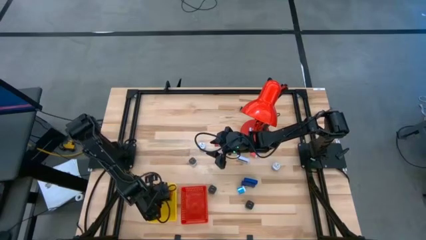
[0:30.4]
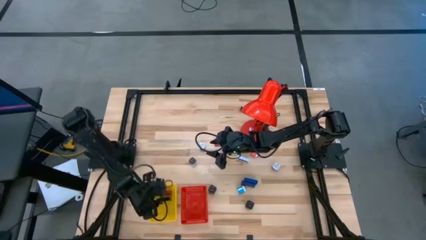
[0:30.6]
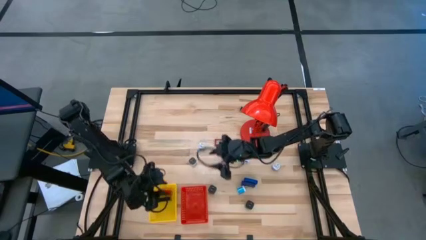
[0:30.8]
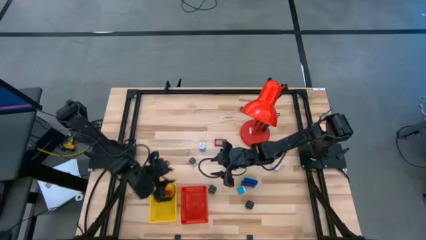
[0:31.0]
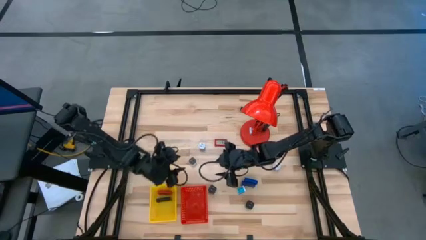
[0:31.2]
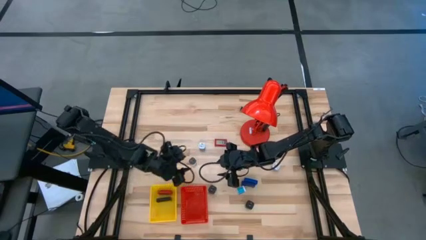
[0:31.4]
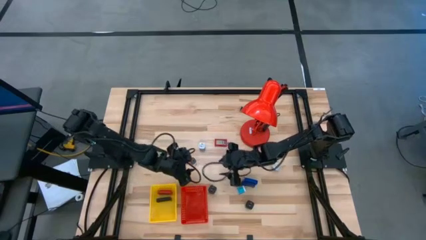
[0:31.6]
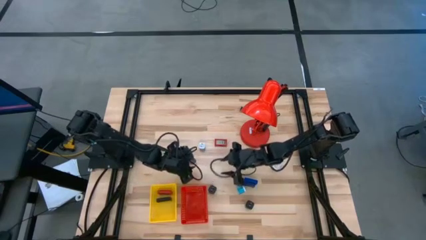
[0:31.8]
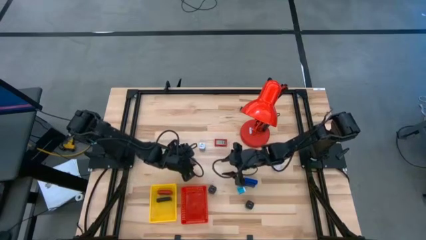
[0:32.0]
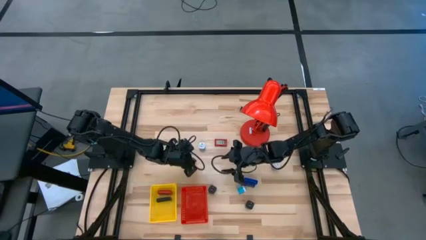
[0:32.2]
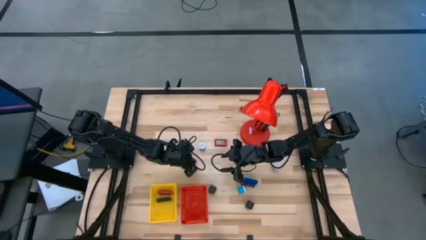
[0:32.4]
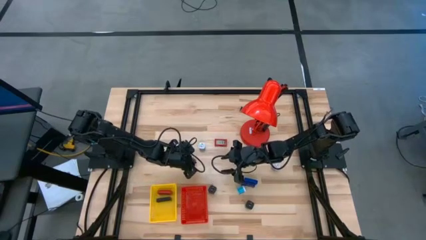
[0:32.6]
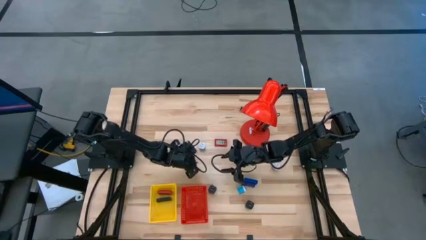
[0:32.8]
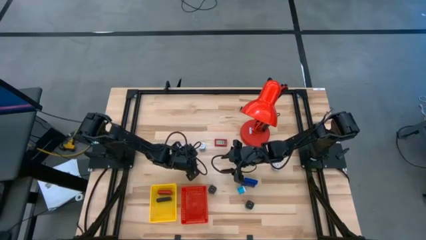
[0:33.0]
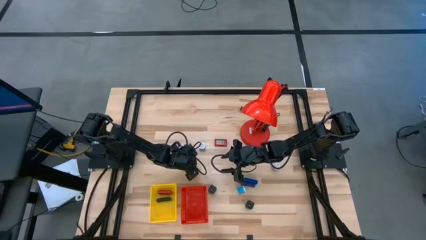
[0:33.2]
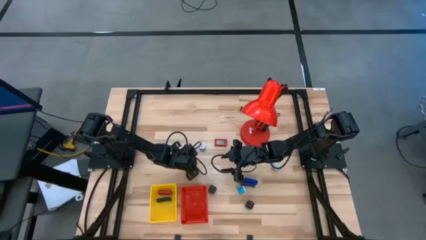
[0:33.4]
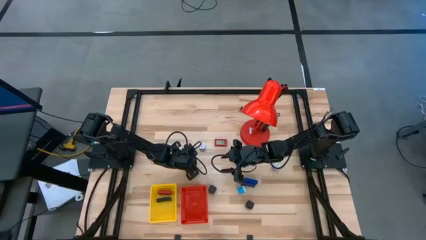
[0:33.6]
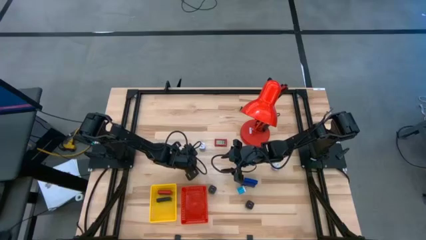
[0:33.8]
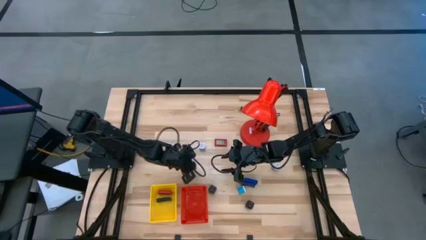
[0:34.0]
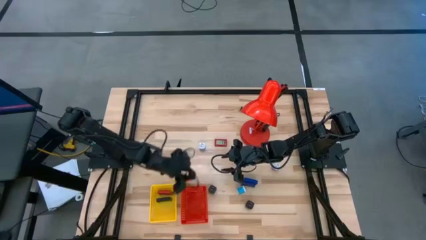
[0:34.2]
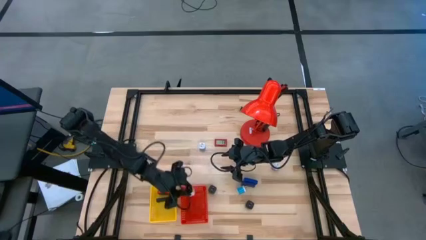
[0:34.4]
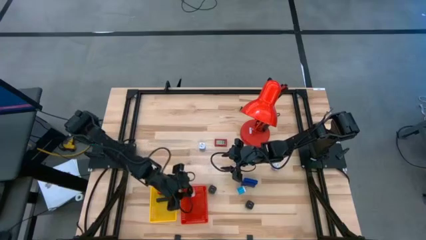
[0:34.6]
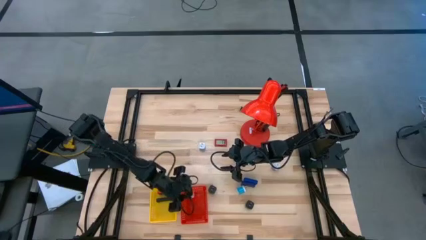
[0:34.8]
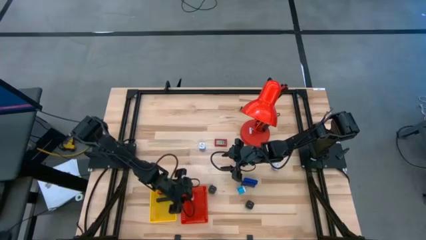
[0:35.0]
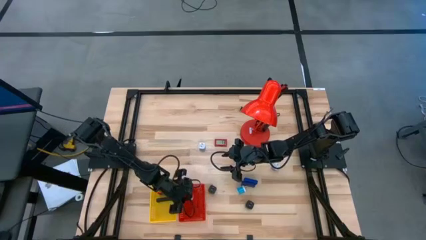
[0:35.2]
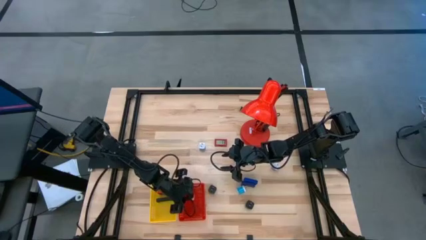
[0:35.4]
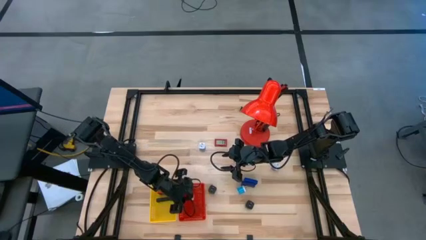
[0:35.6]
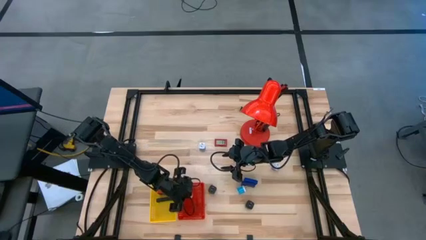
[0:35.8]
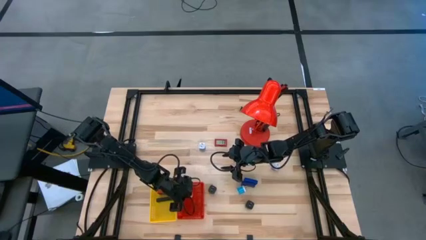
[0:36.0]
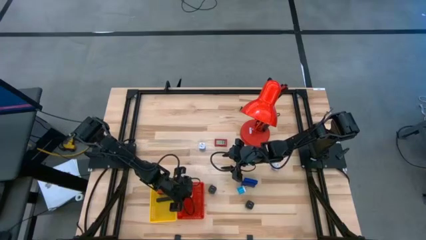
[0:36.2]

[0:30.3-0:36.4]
Task: Pick & Place Office items
Put the black charger adapter into the red bin

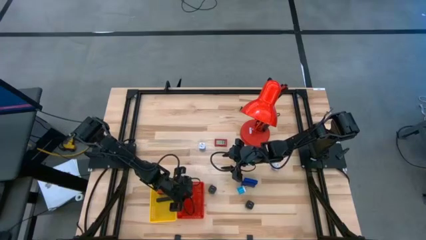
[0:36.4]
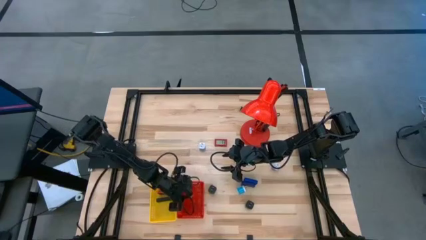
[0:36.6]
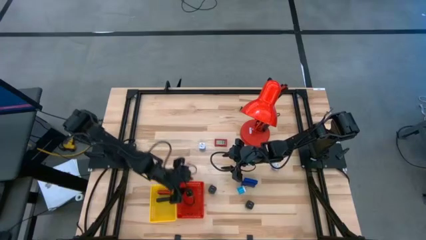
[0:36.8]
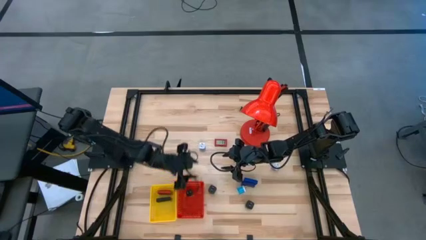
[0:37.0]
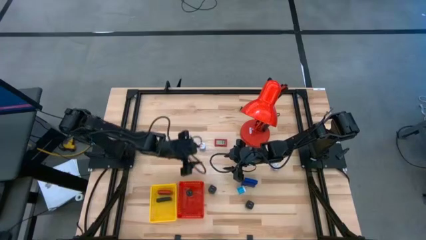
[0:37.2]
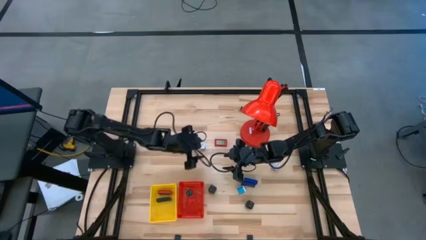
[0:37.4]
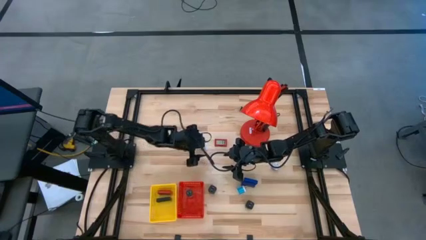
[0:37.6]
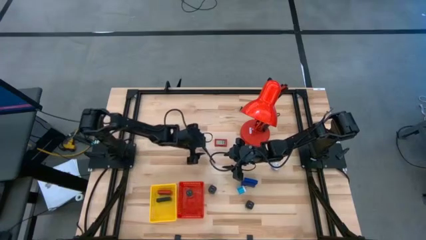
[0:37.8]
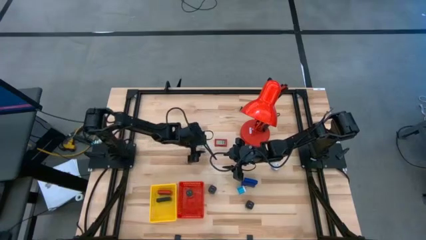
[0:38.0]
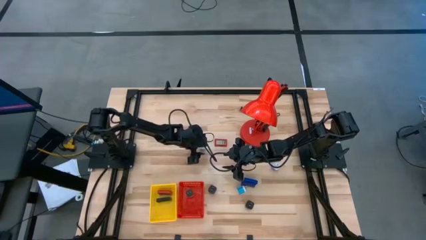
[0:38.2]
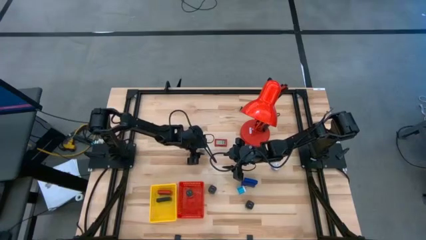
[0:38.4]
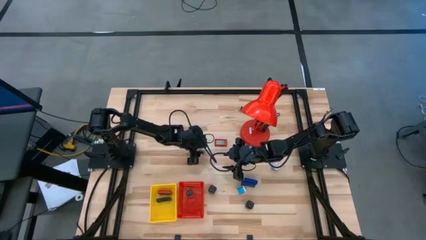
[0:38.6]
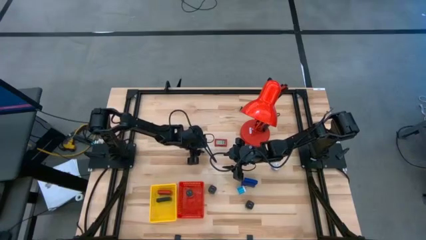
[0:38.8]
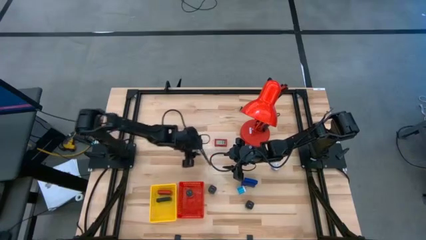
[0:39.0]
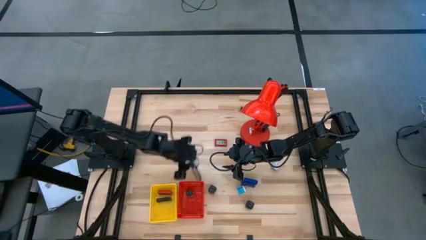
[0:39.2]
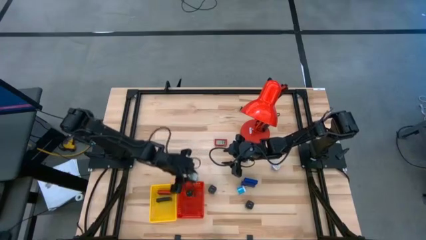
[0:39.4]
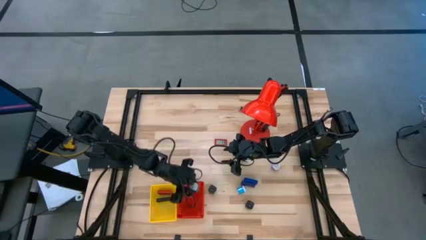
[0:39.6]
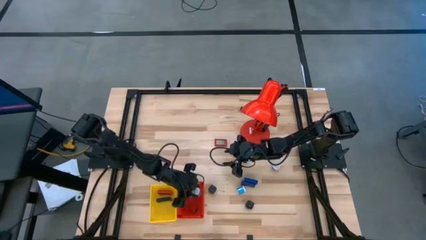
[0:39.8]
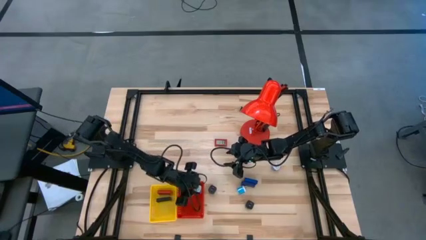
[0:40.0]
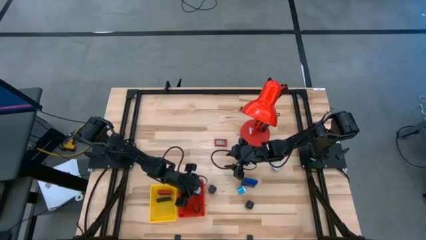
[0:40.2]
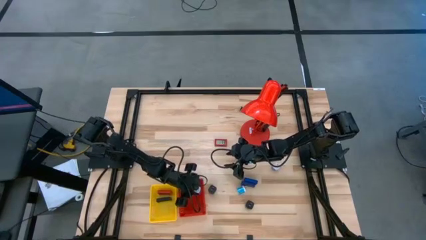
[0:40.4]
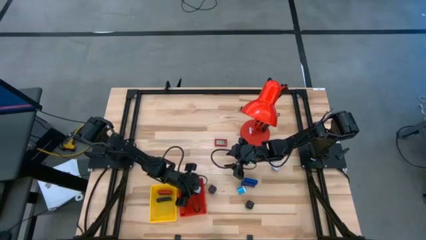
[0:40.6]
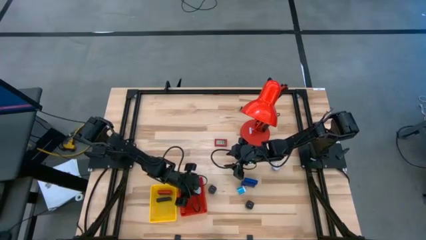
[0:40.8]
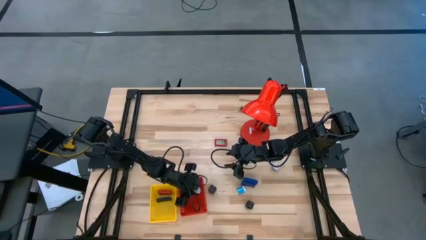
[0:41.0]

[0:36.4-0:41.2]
Put the top light blue charger adapter into the red bin

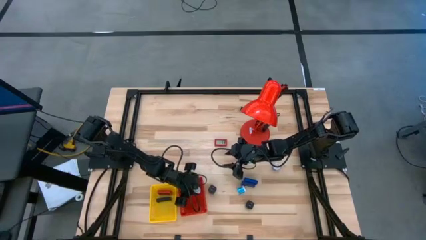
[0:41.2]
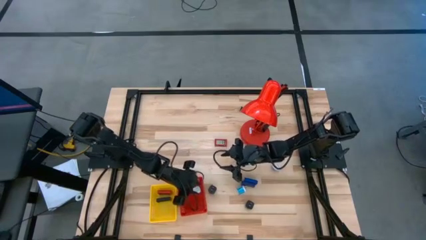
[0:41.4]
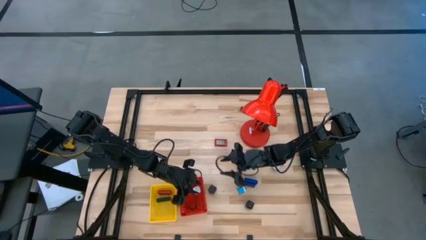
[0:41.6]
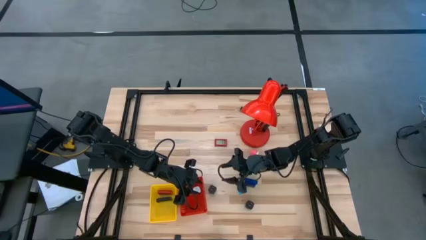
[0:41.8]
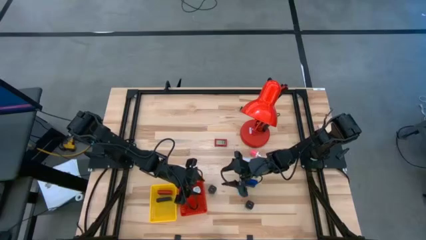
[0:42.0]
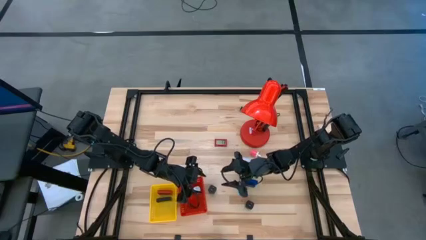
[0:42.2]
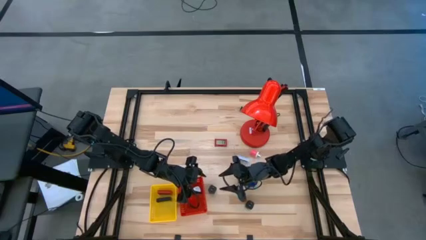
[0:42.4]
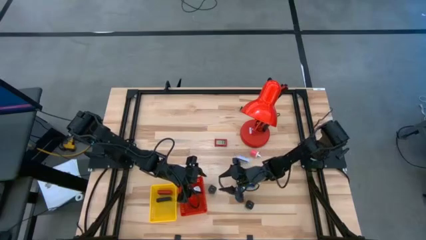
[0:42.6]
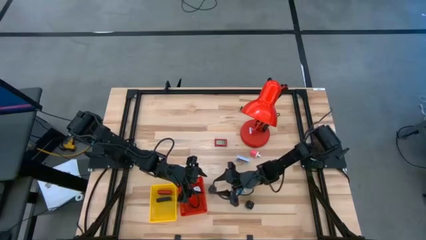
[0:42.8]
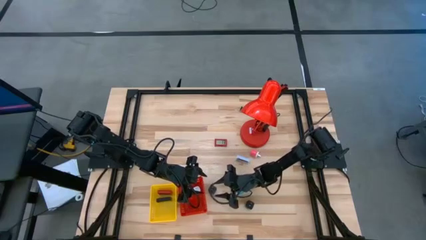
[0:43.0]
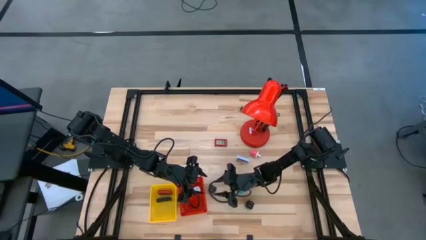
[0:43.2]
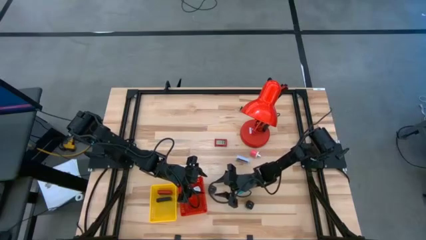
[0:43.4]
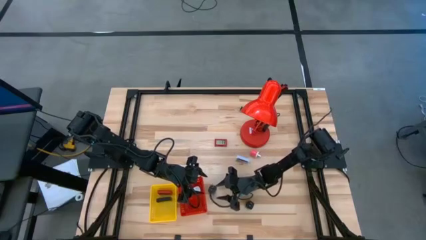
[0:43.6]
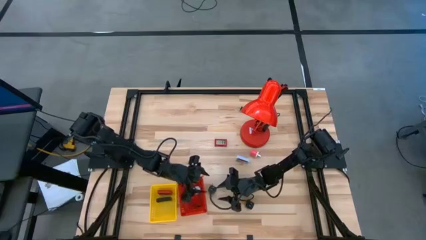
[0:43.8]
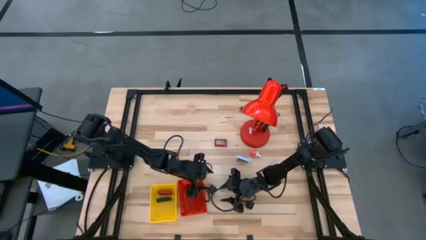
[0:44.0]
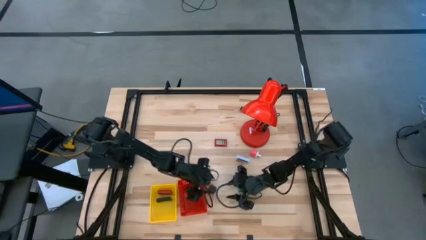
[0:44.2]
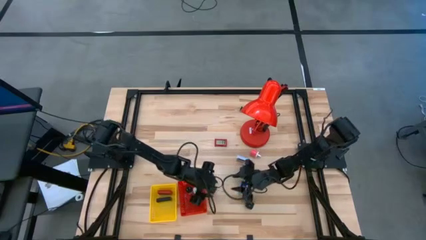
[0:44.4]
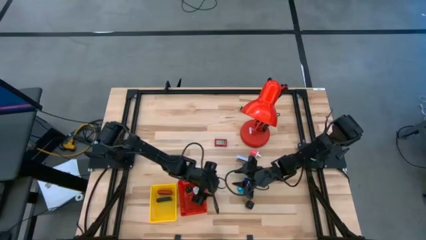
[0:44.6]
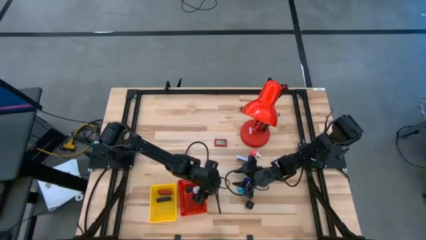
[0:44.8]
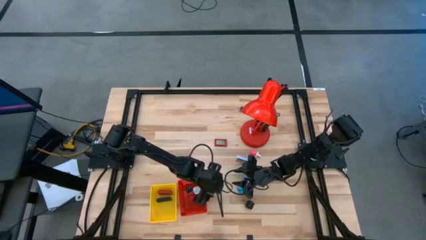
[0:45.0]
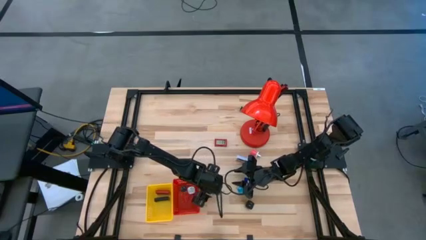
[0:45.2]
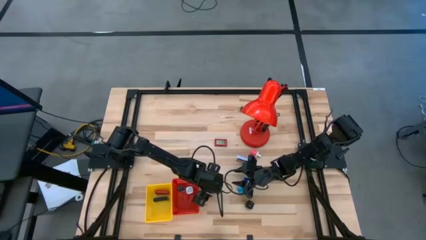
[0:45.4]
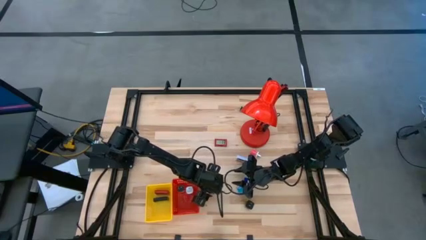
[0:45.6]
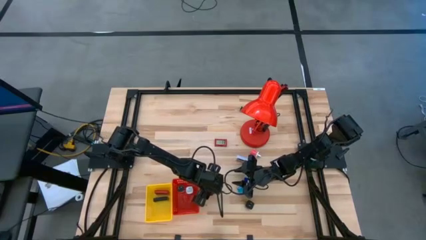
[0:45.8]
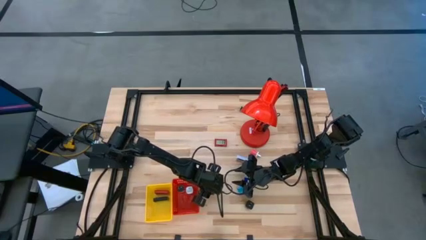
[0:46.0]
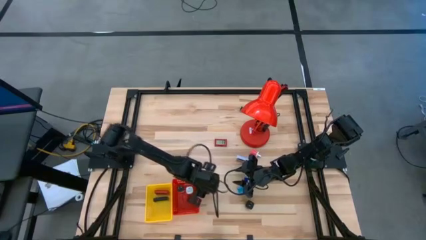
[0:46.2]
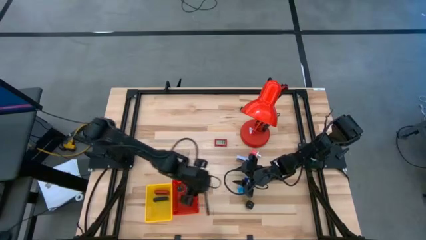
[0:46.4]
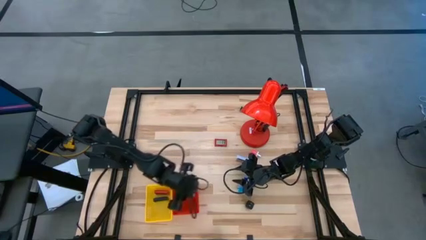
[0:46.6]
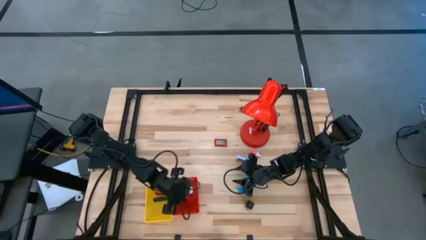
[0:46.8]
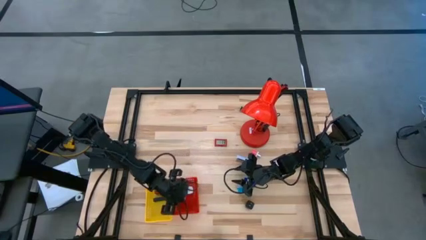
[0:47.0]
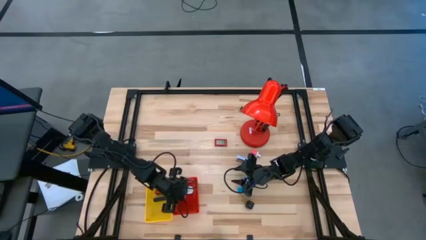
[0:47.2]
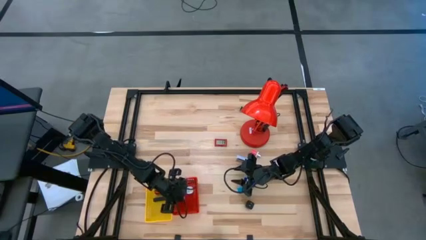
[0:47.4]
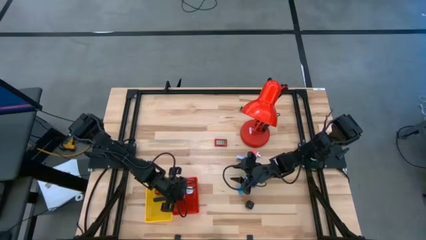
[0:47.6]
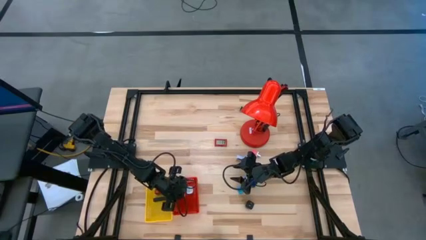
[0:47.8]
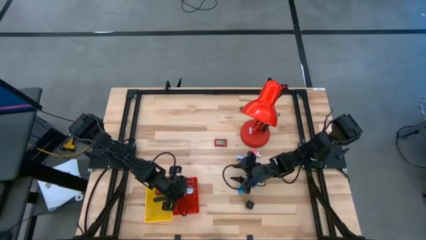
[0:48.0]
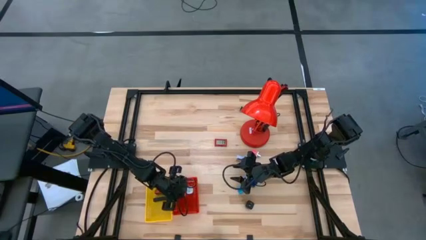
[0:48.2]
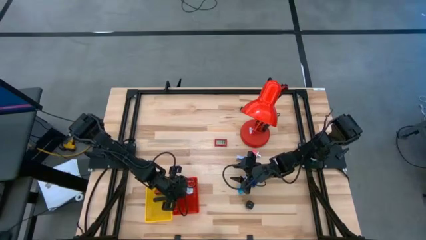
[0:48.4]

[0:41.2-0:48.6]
Put the black charger adapter into the red bin
